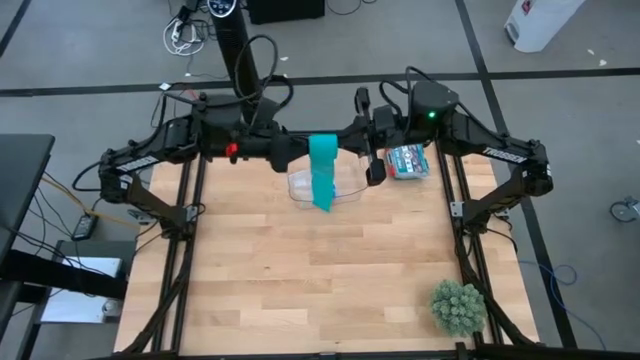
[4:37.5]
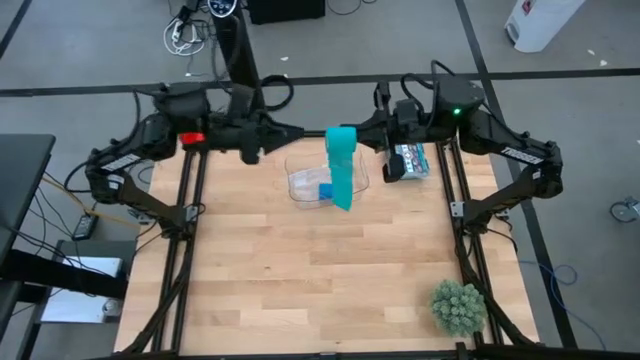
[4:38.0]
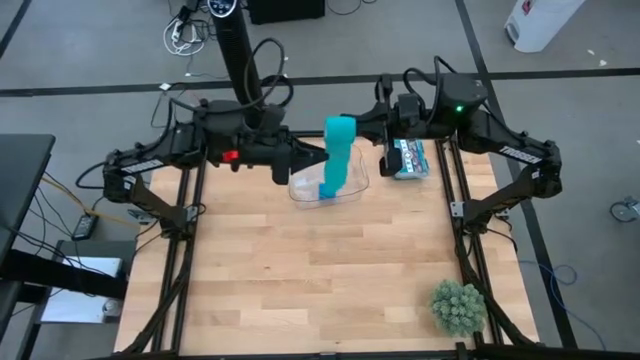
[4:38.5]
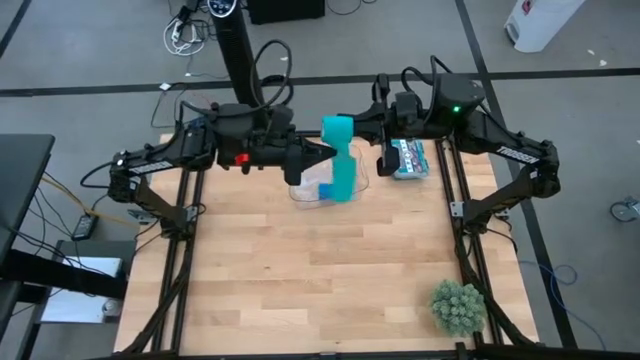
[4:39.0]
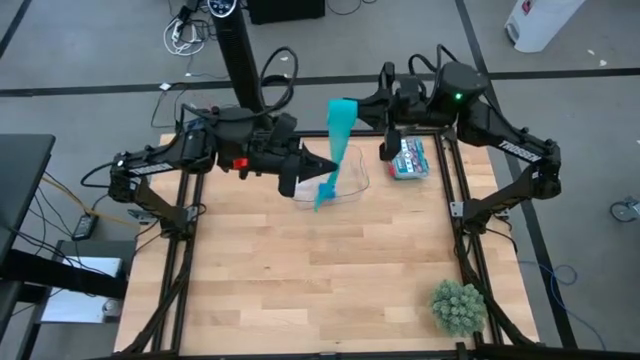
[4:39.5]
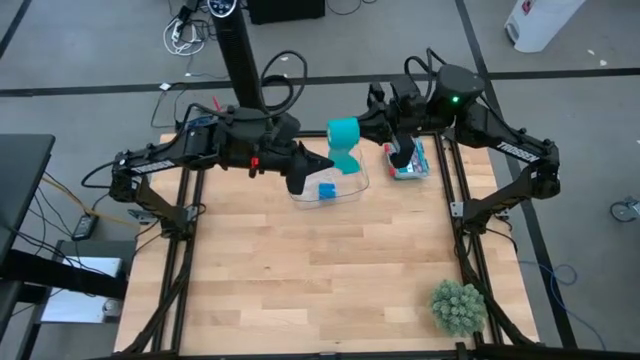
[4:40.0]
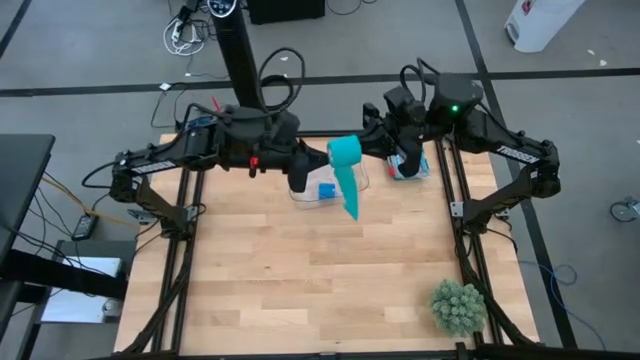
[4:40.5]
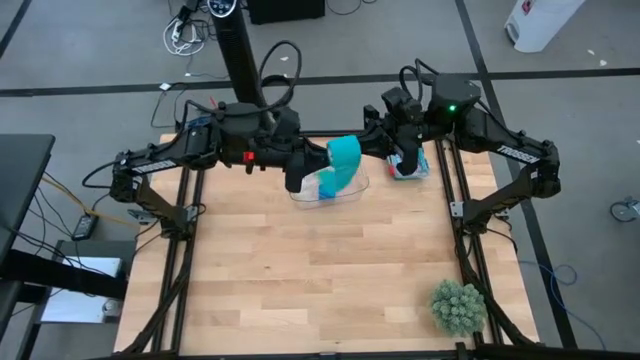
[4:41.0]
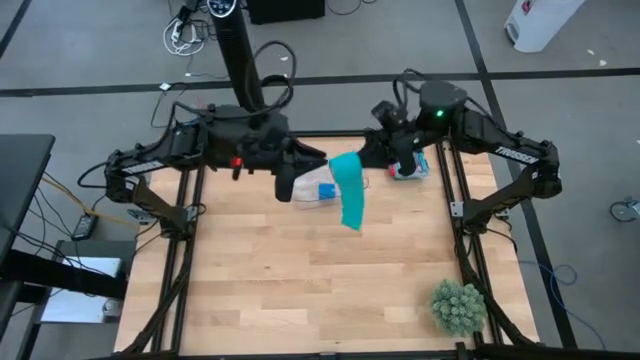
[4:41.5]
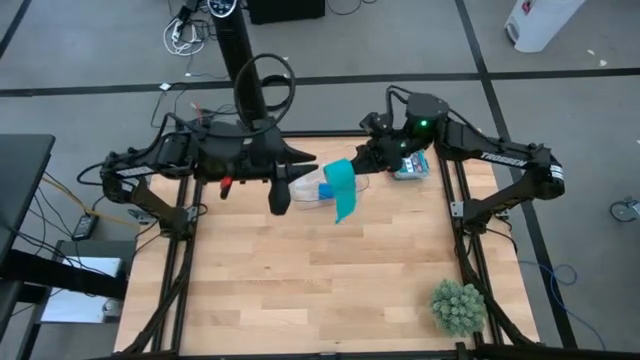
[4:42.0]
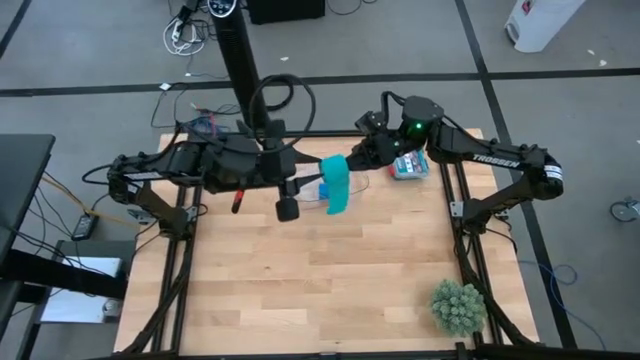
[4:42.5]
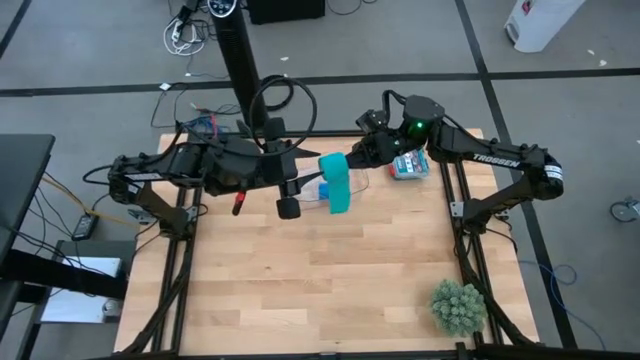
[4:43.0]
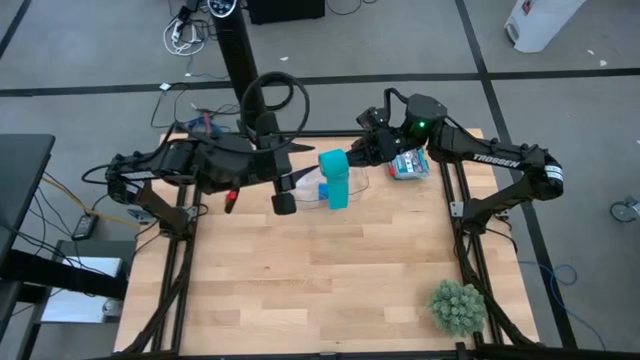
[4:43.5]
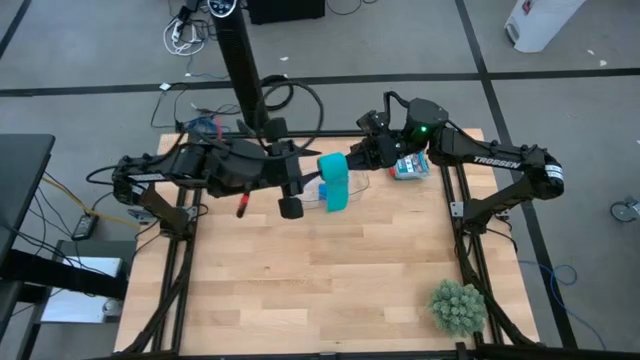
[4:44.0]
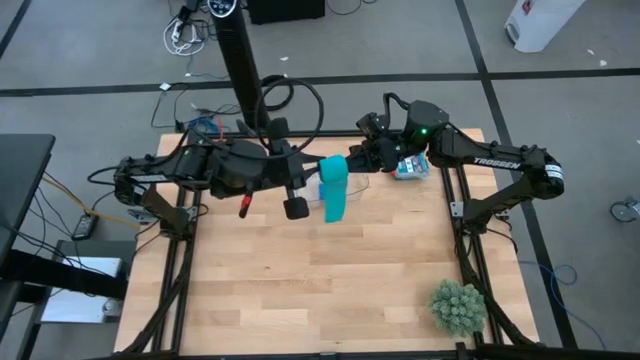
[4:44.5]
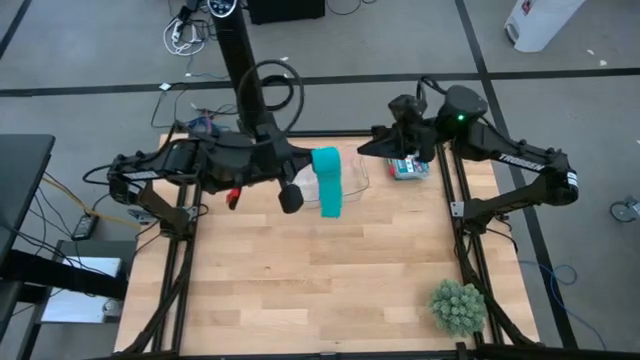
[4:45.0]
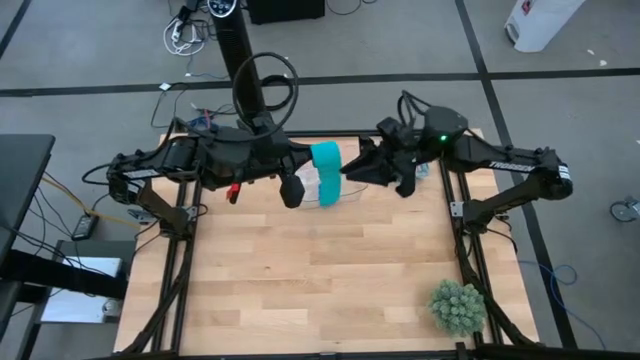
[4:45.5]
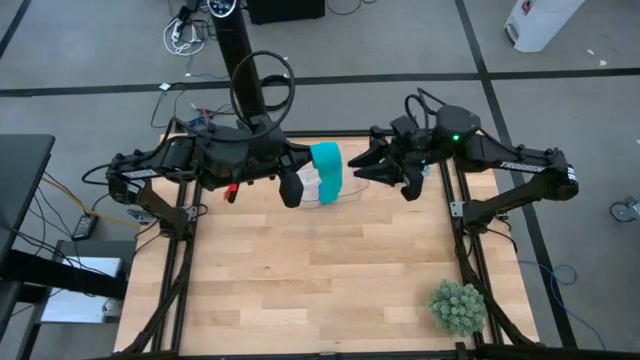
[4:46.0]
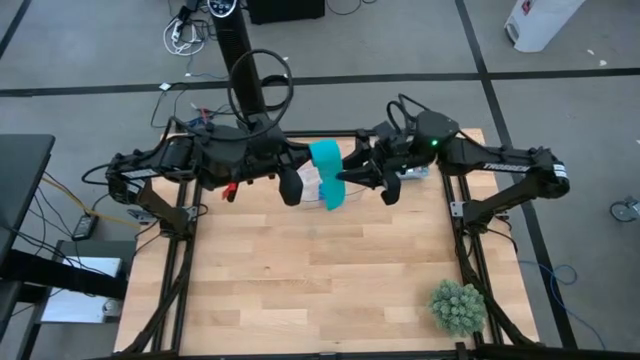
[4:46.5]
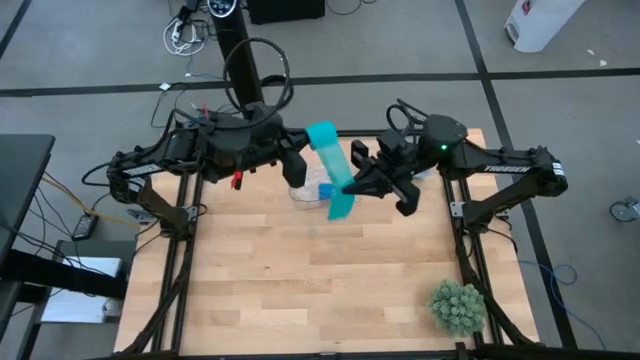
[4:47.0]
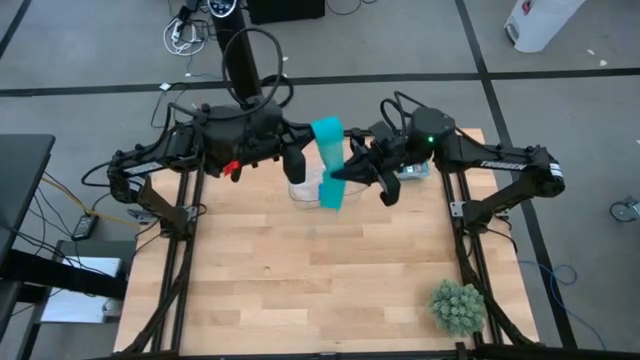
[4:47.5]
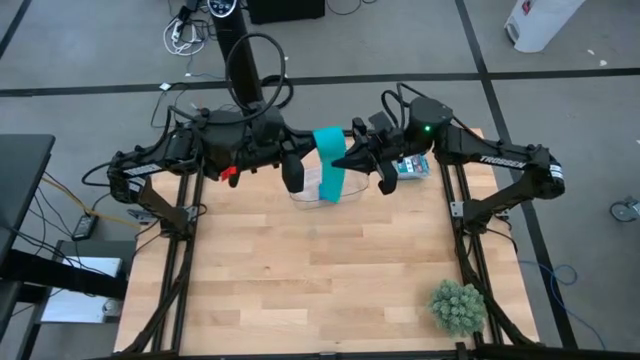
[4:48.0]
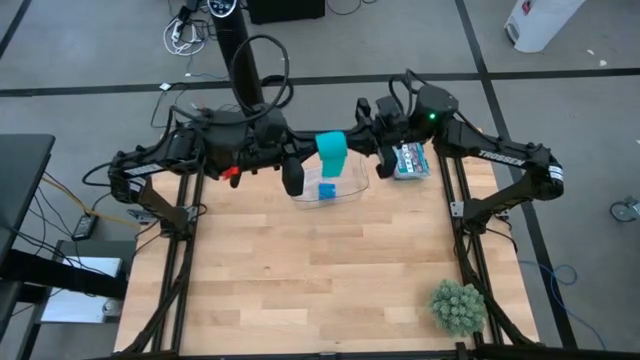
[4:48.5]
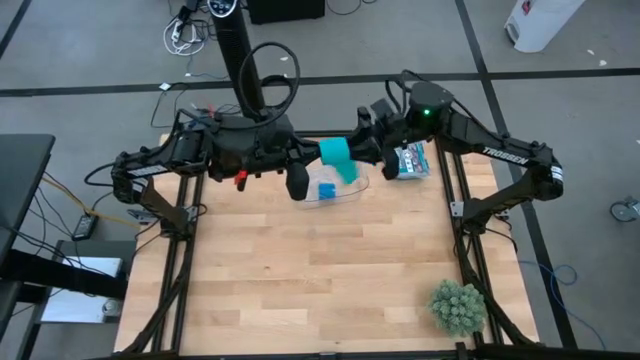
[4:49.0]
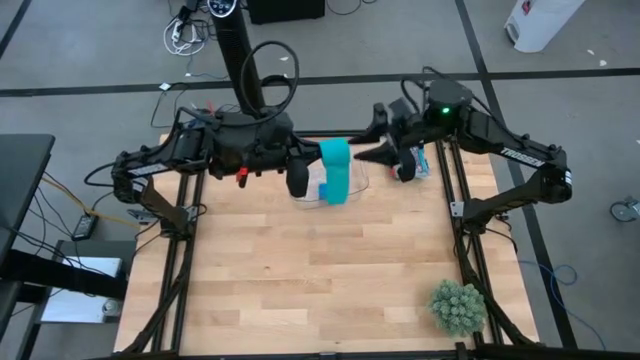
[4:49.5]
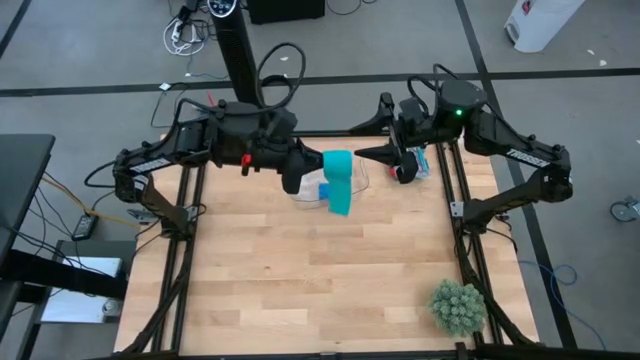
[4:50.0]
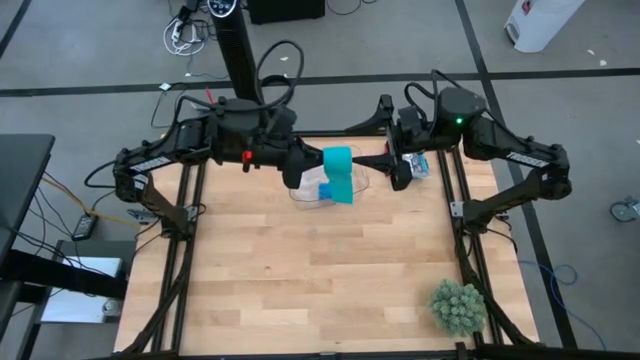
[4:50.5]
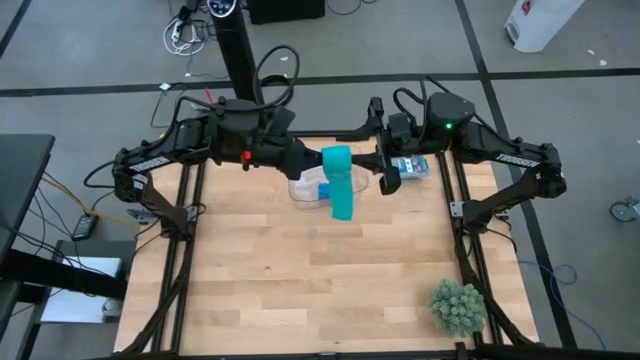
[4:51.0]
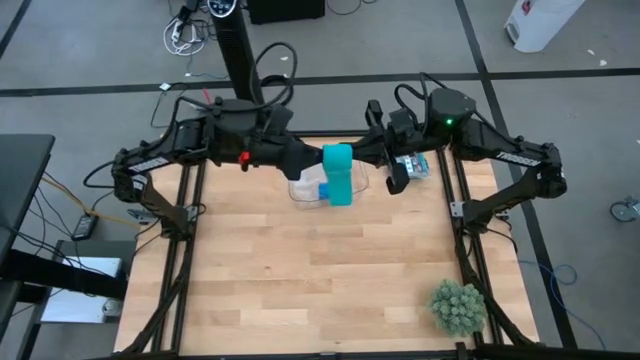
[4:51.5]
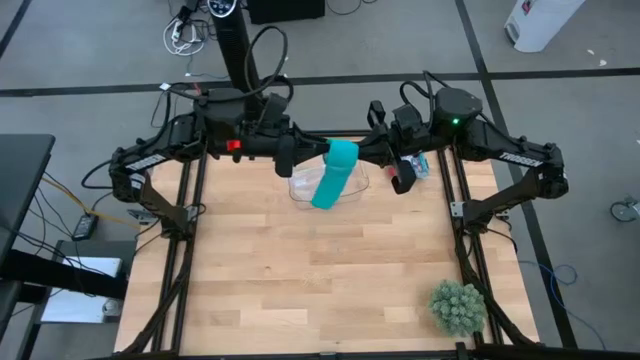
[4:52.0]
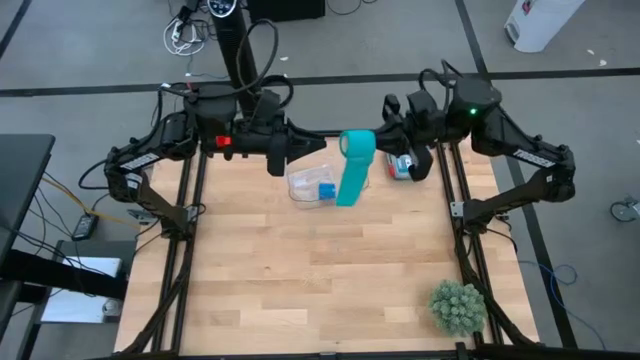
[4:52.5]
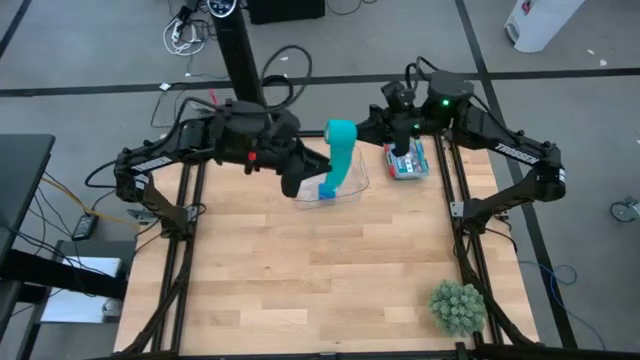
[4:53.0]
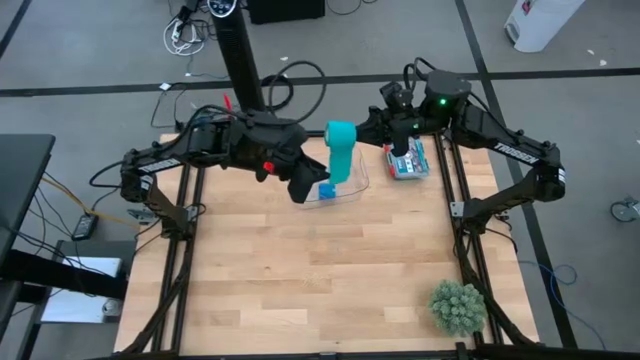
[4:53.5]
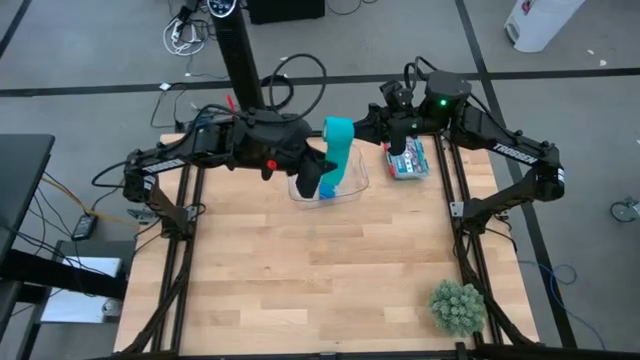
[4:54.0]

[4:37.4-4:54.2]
Task: Roll bandage
Roll the sky blue bandage

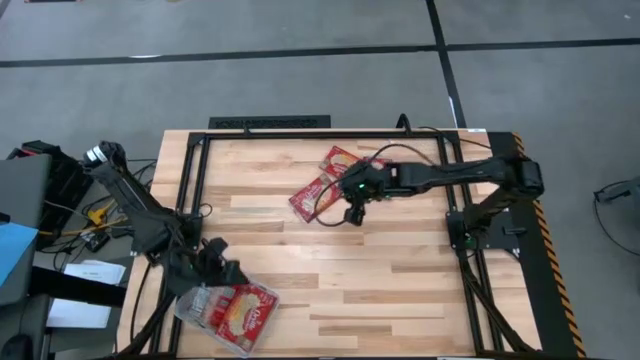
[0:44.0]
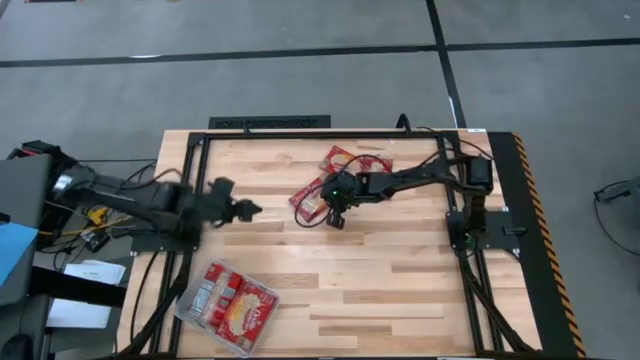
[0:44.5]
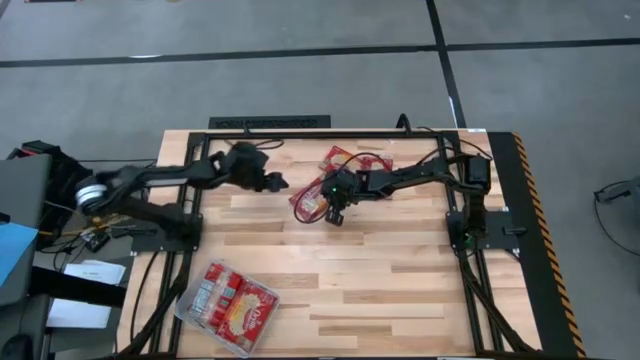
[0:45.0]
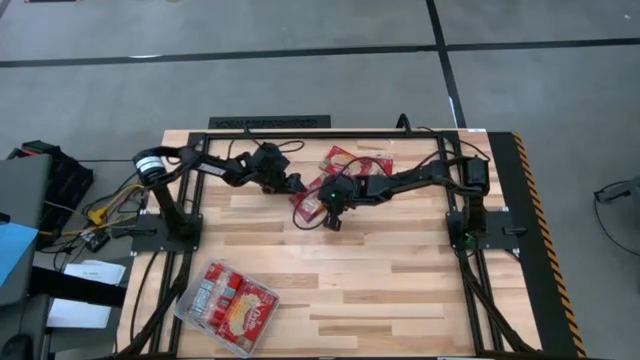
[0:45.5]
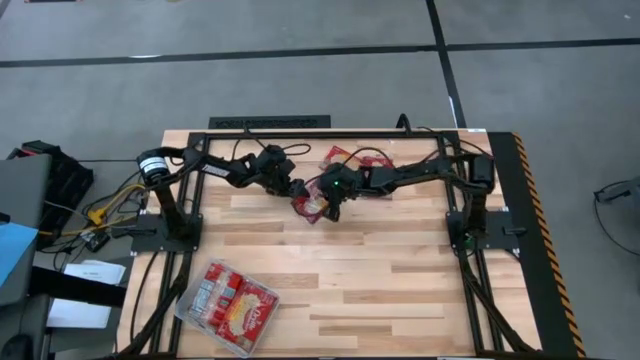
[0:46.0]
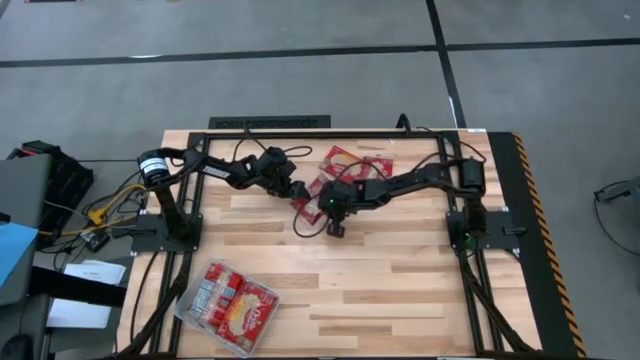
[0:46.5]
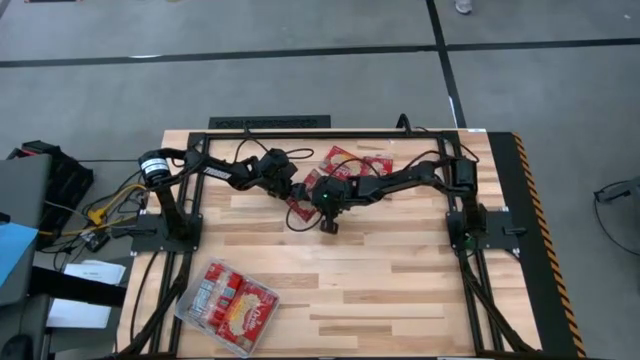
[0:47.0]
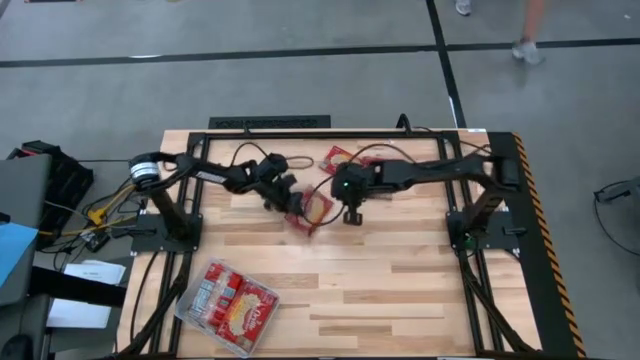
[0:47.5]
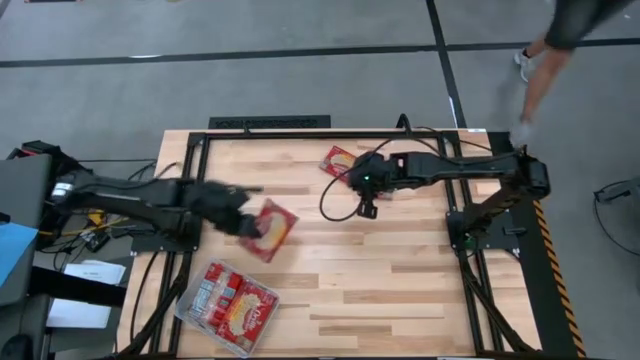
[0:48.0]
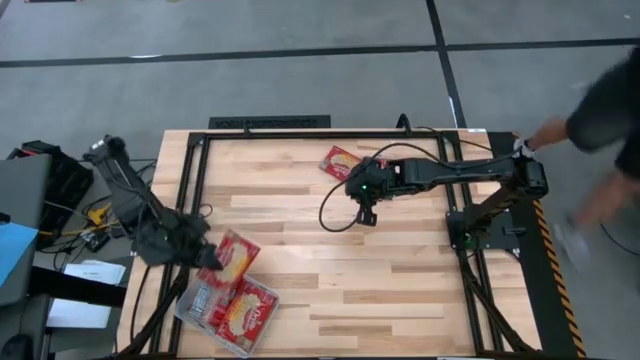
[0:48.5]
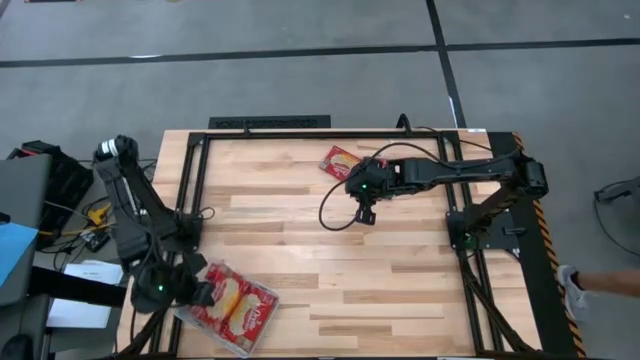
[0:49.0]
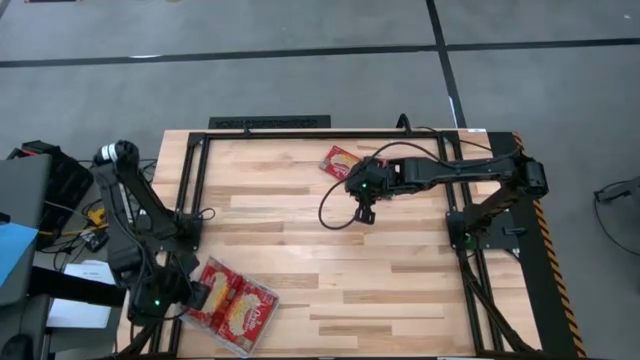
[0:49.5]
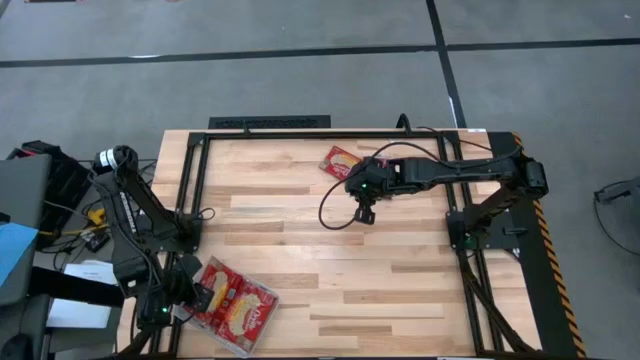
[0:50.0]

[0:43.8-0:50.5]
Task: Sort popcorn bags into baskets
Put the red popcorn bag into the transparent bin
